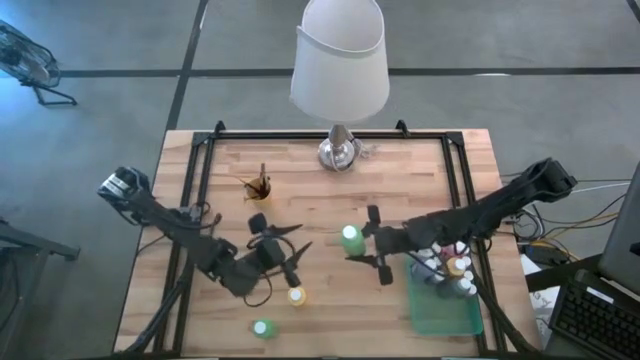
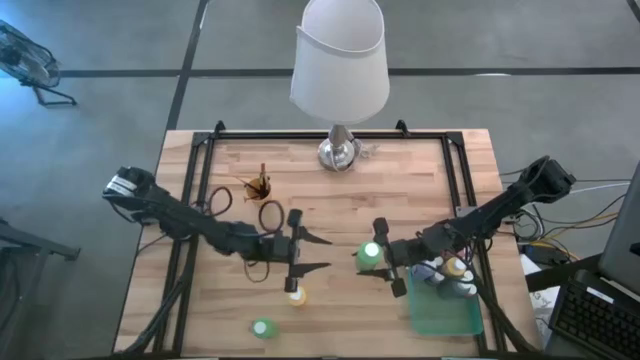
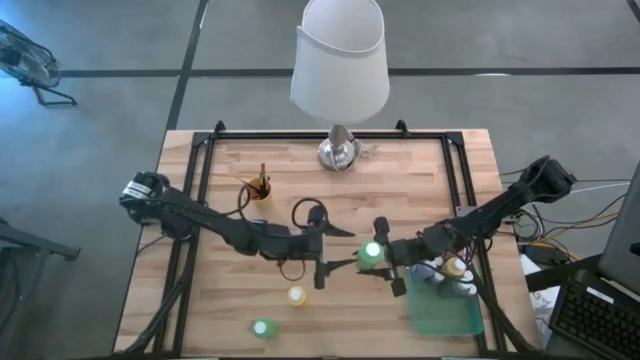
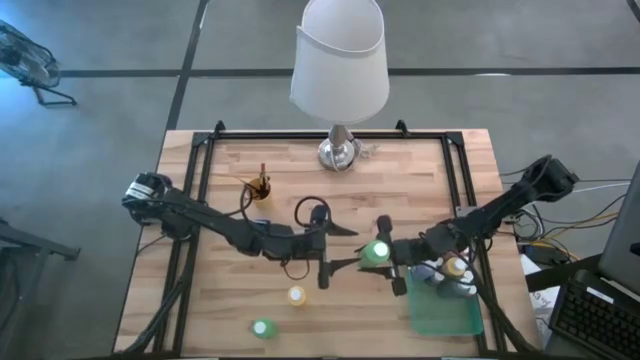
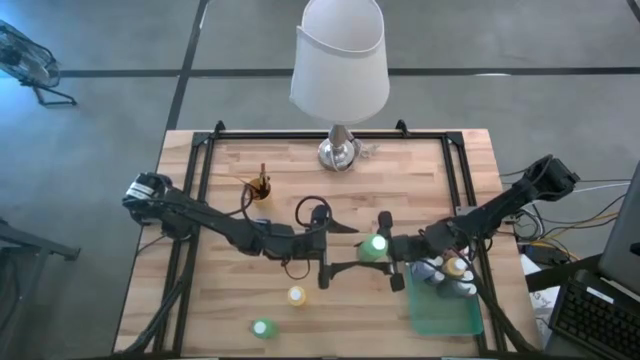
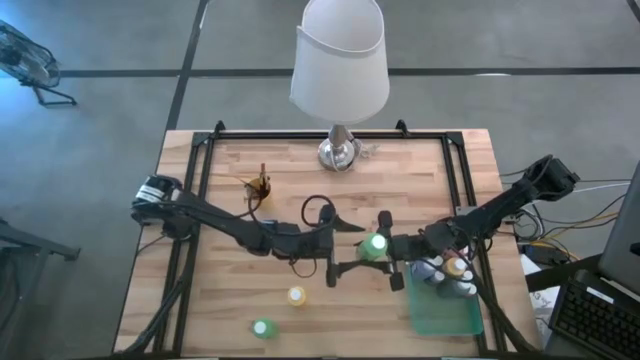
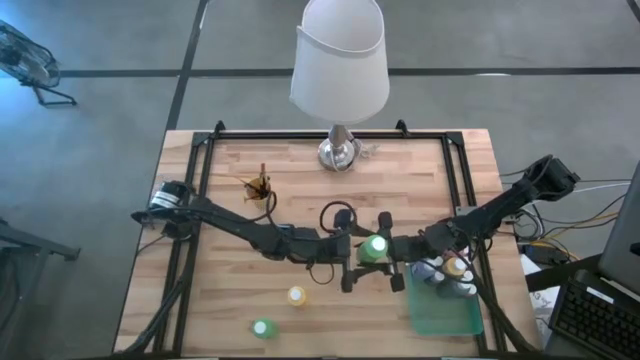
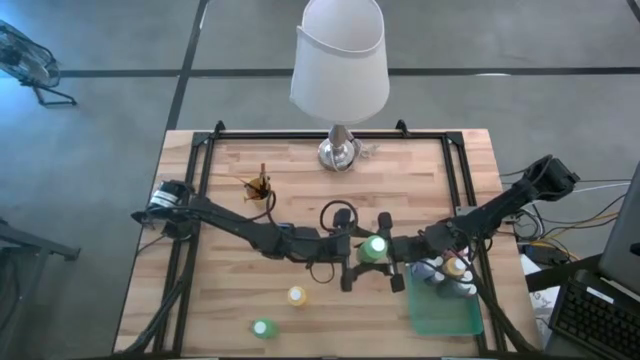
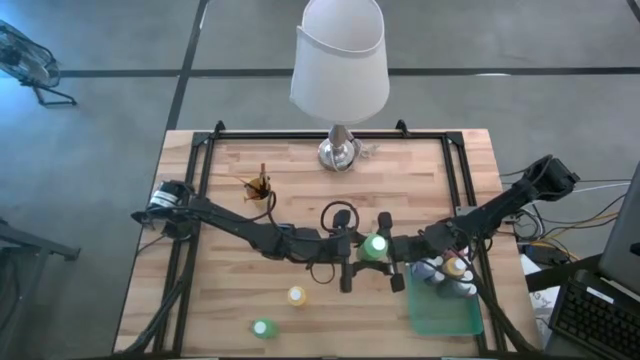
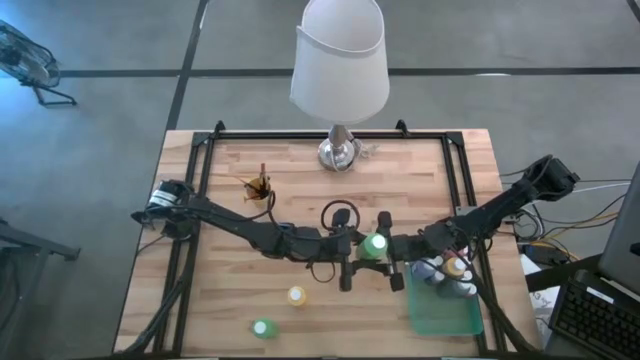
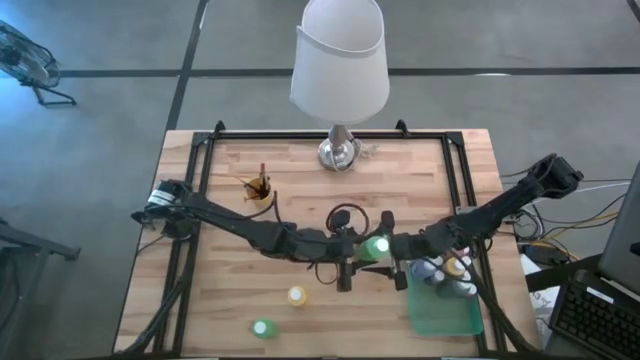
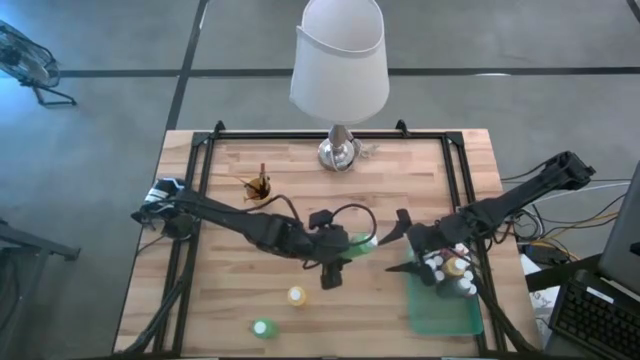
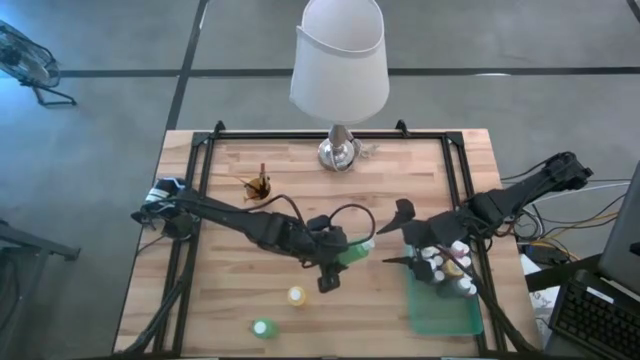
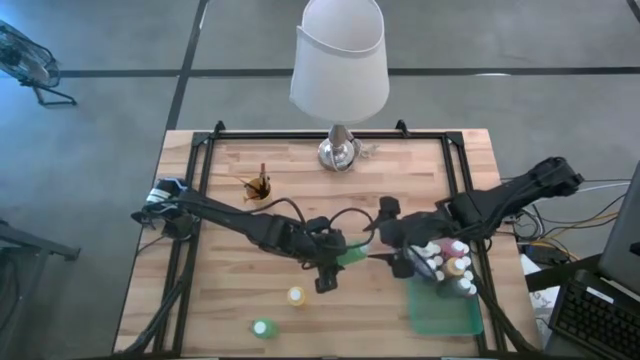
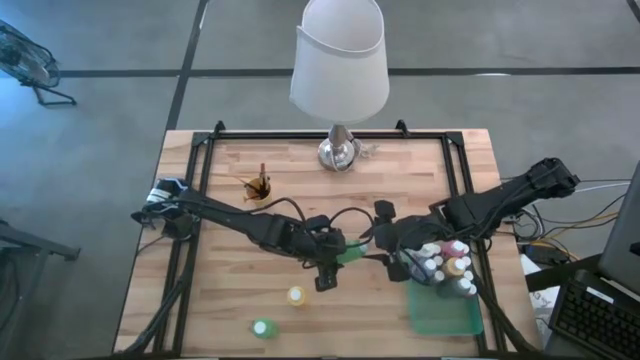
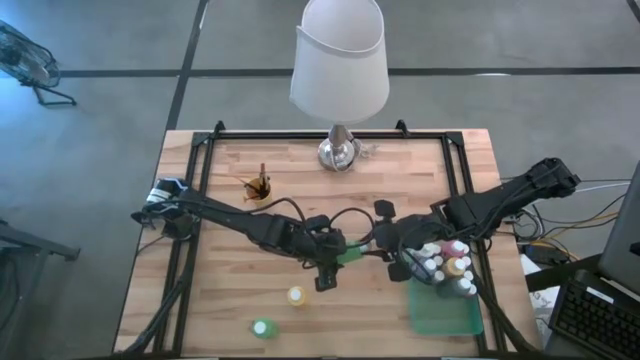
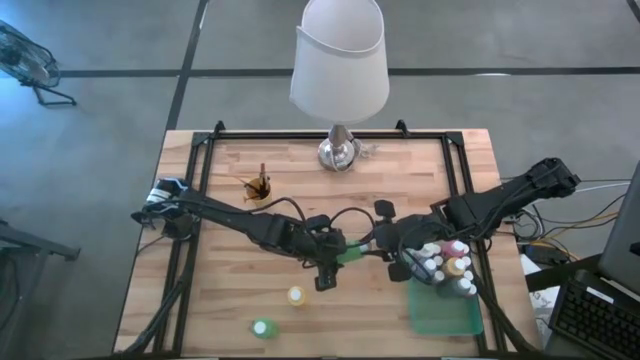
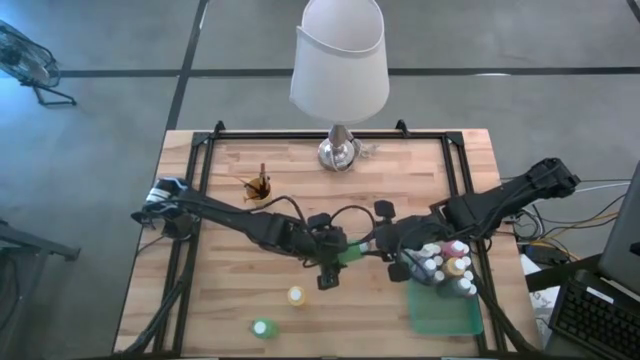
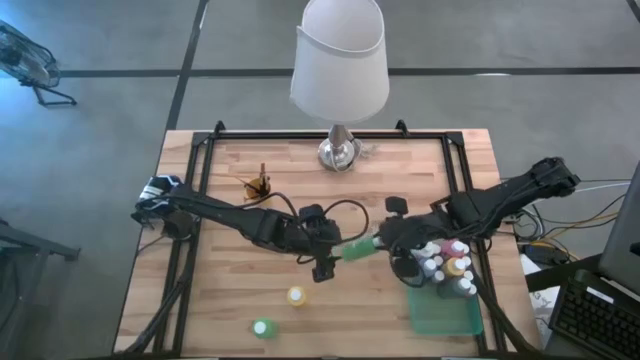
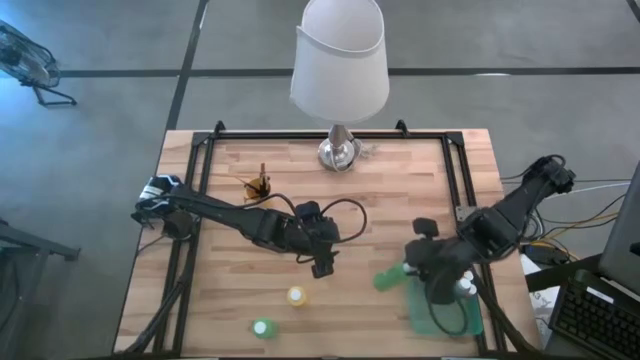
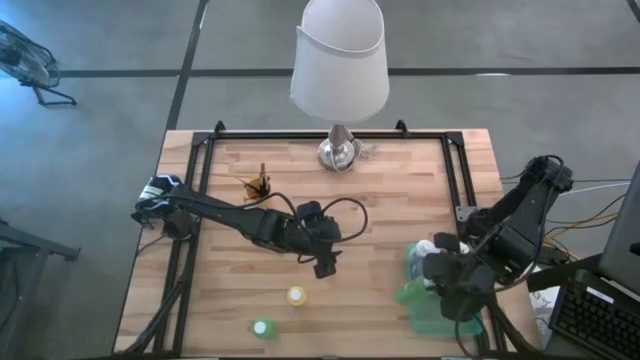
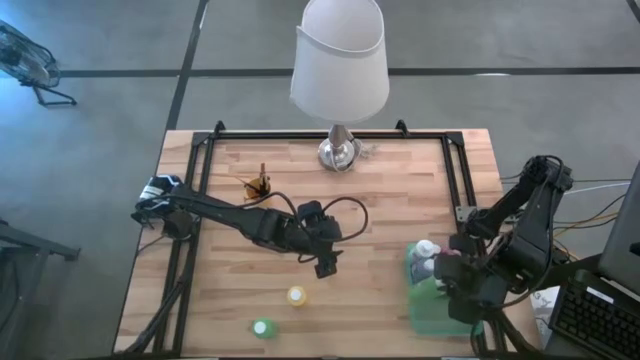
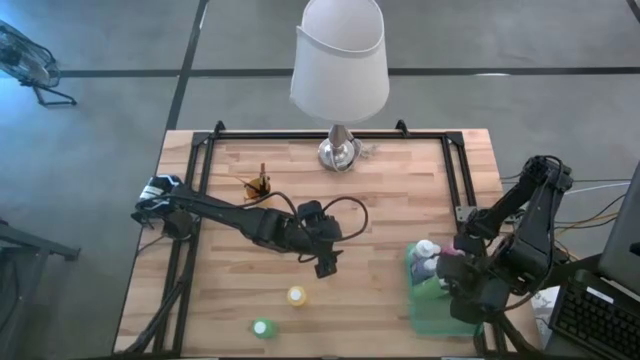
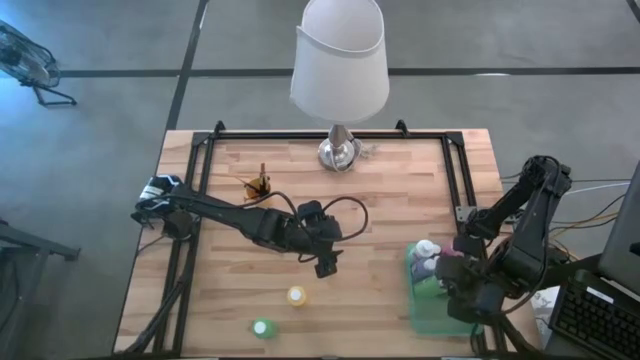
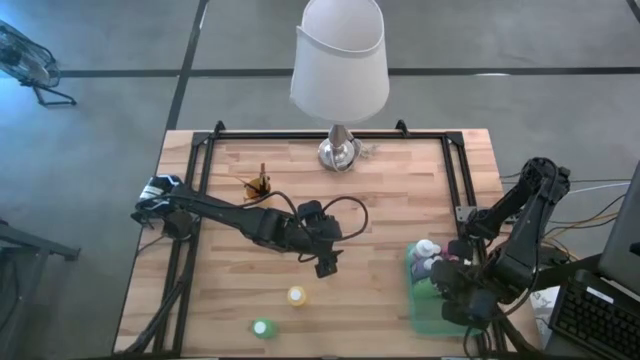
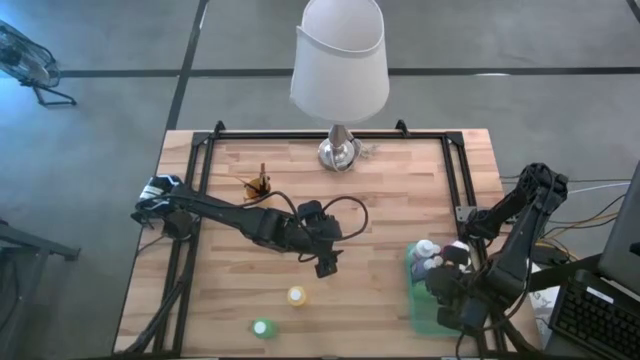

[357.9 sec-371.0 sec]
Task: Pick & Place Paint Supplies
Put the green paint bottle into the green bin
